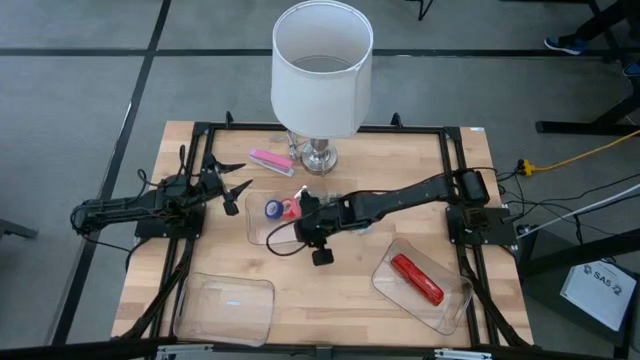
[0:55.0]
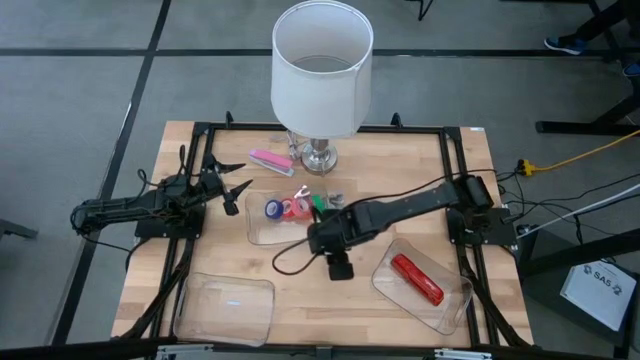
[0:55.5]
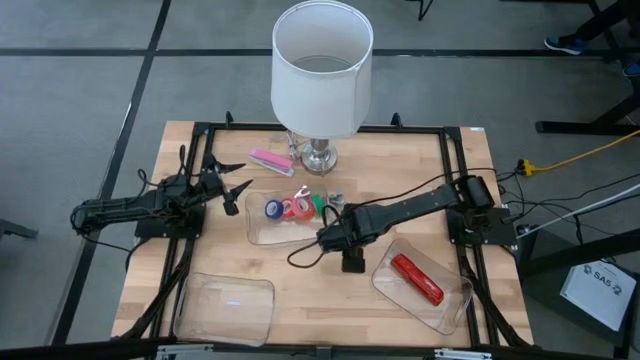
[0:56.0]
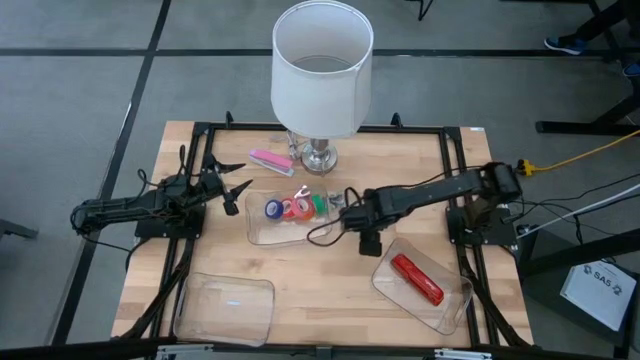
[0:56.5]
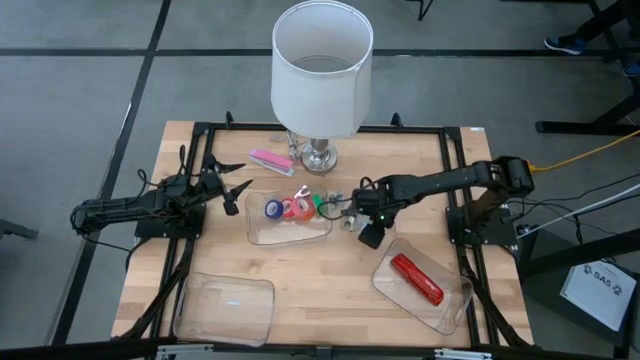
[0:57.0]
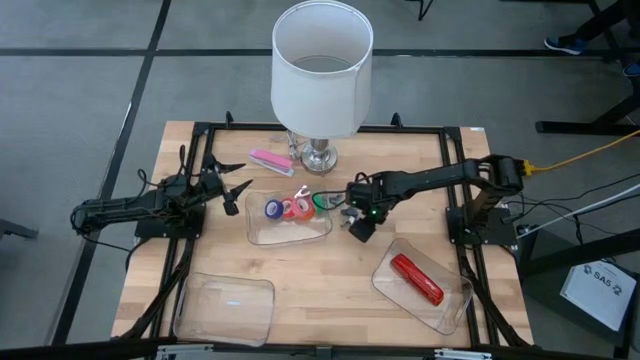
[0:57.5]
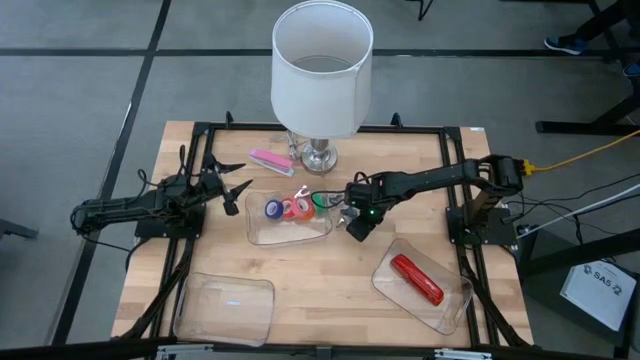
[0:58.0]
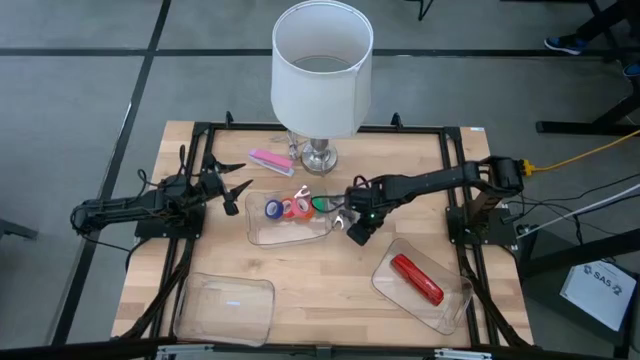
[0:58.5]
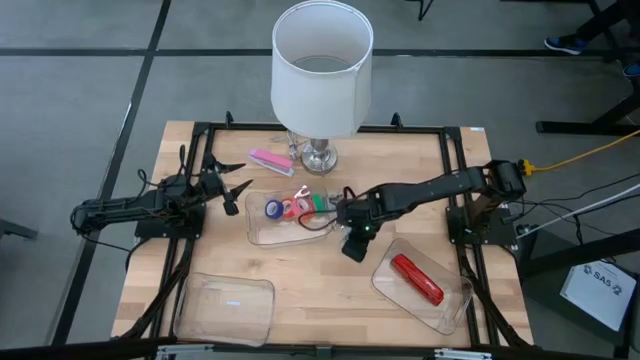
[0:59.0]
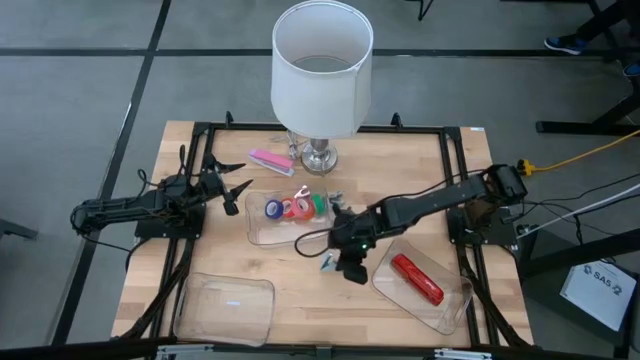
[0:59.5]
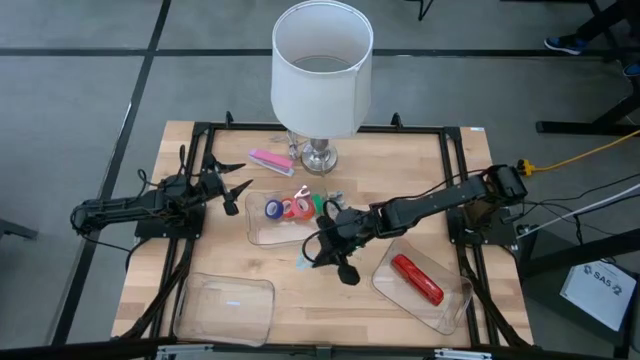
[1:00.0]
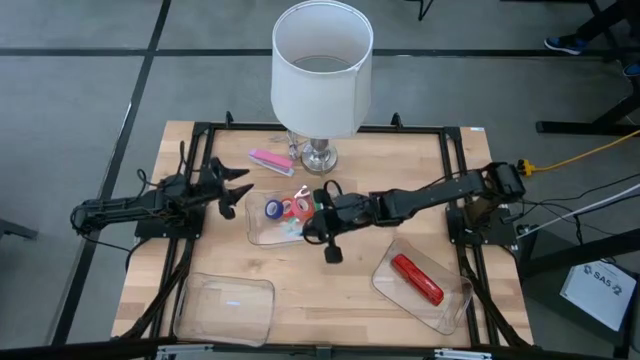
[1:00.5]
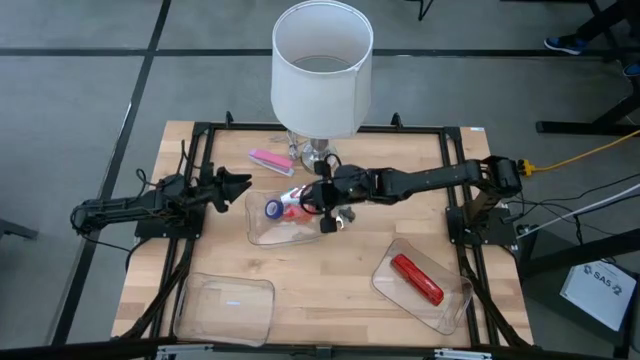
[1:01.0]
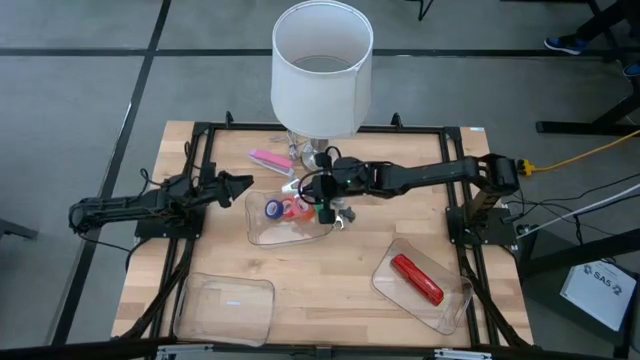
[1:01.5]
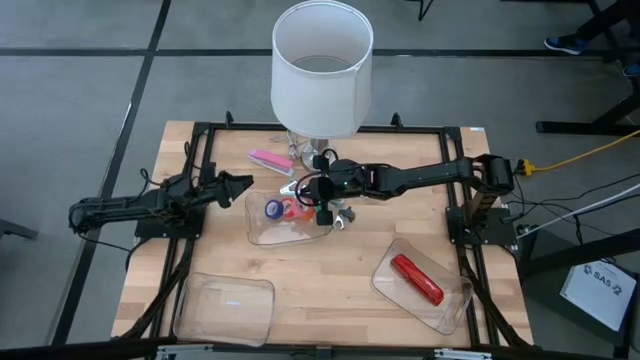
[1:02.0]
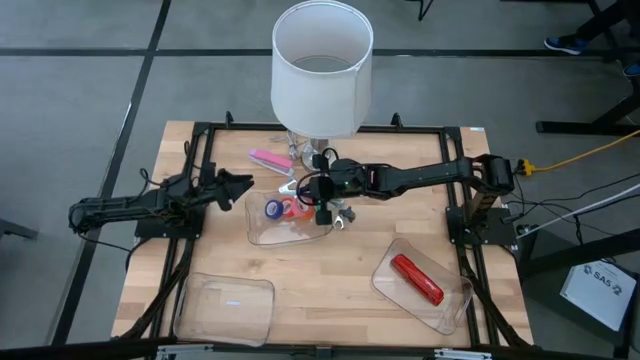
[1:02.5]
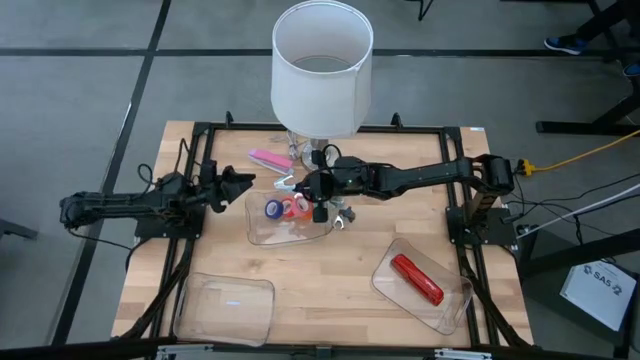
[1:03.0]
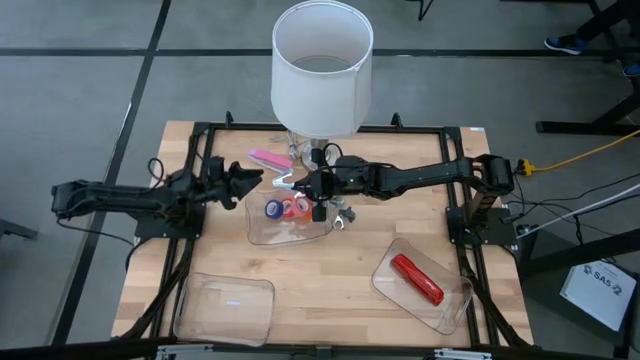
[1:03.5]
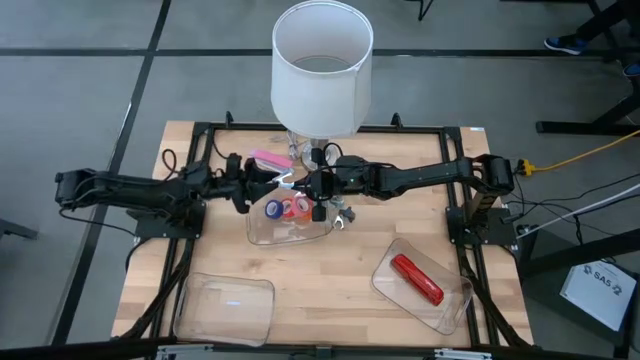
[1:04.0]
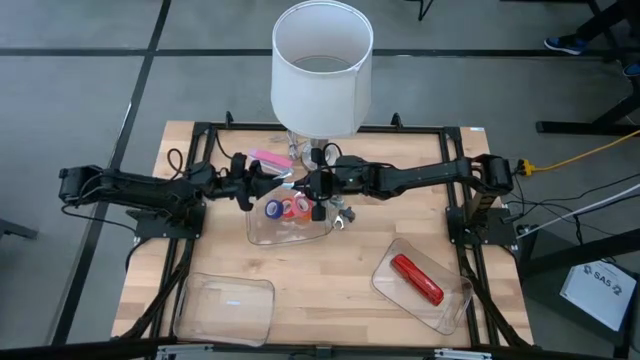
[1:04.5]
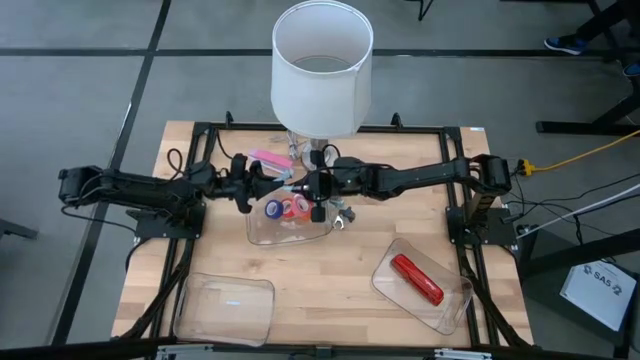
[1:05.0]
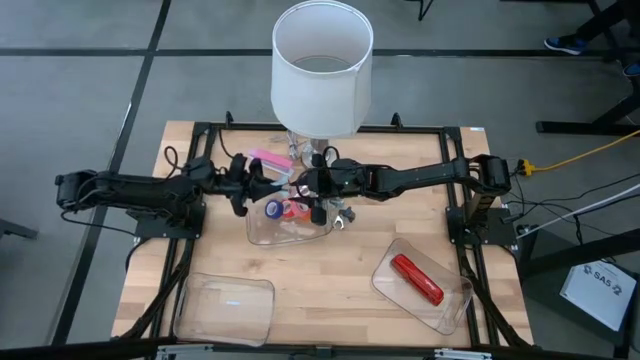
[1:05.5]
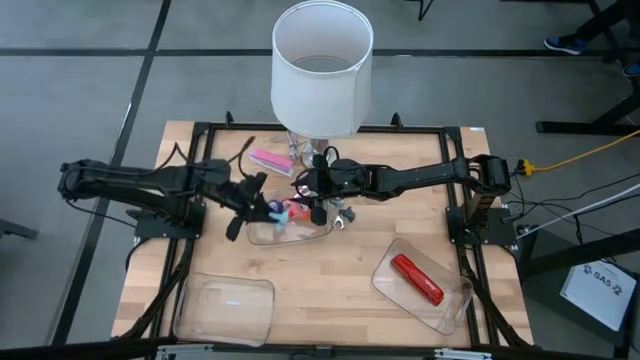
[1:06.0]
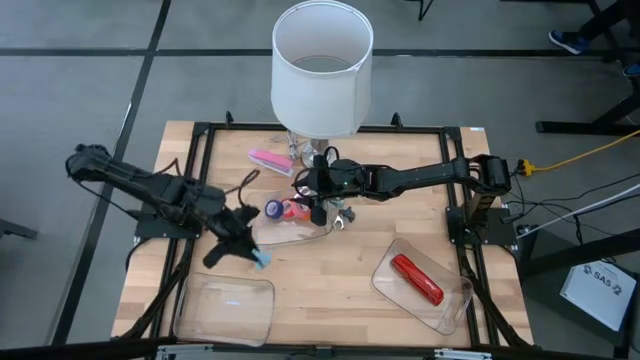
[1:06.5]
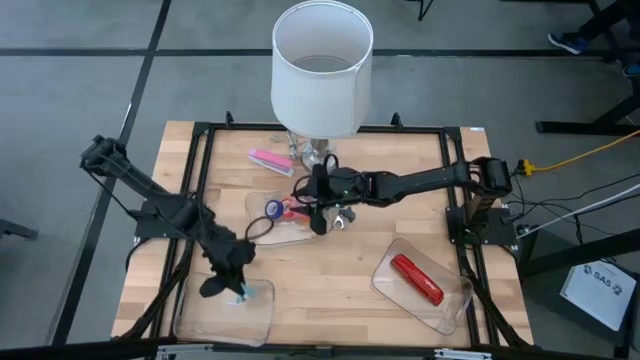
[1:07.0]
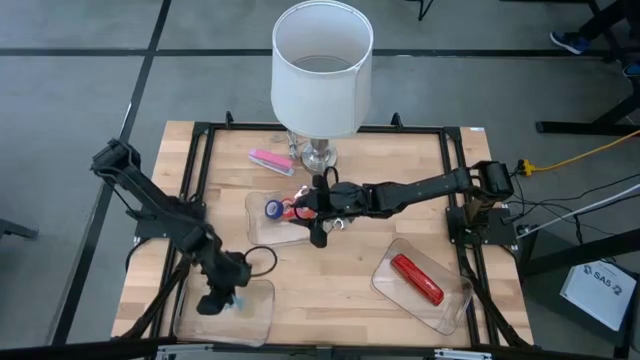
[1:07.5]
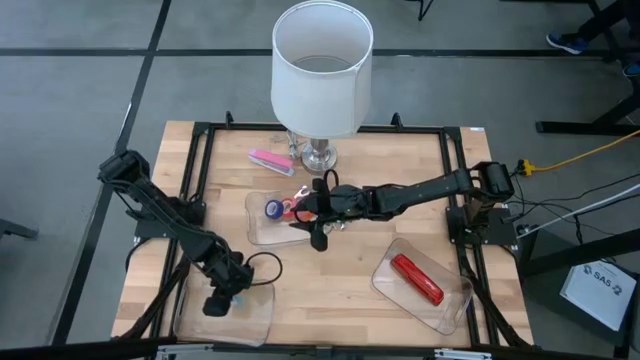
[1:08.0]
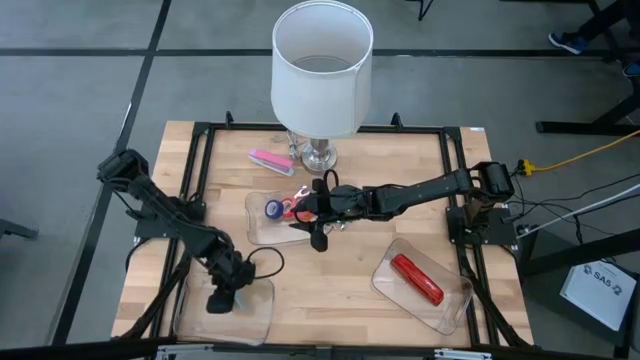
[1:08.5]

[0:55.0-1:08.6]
Task: Pick and place Stapler, Stapler remover, tape
Put the bottom blue staple remover into the bottom left transparent bin

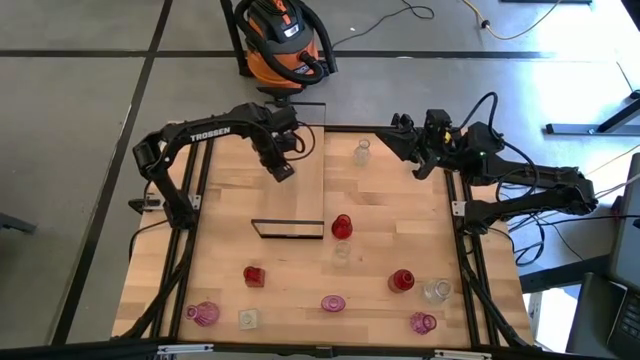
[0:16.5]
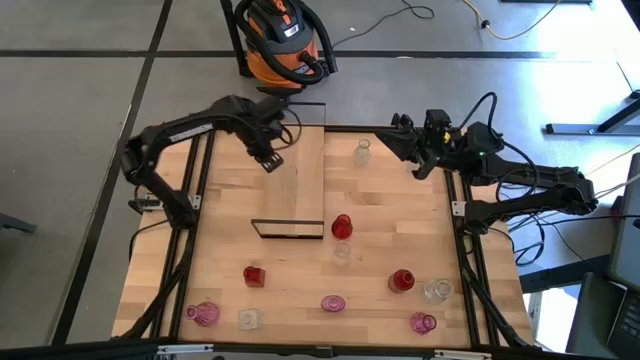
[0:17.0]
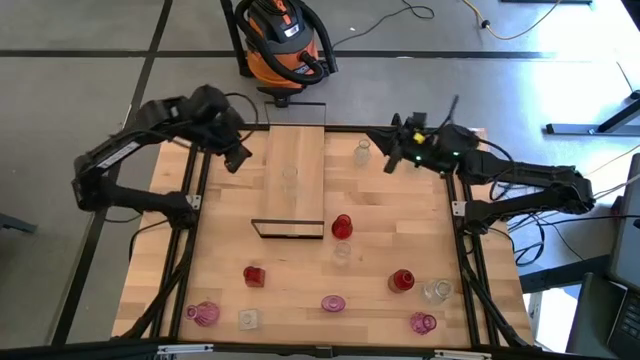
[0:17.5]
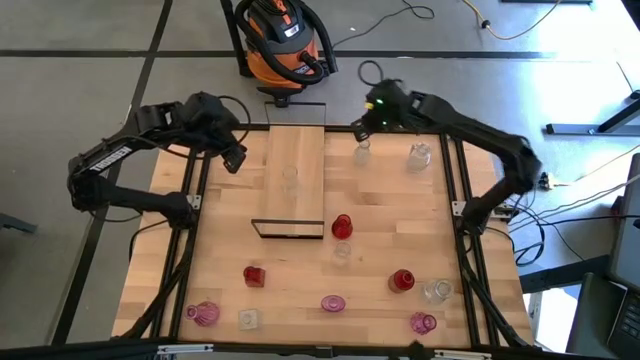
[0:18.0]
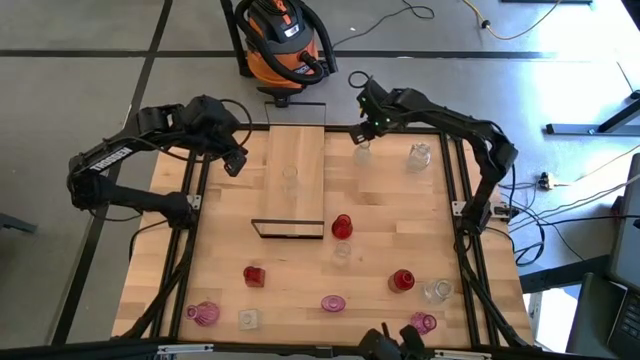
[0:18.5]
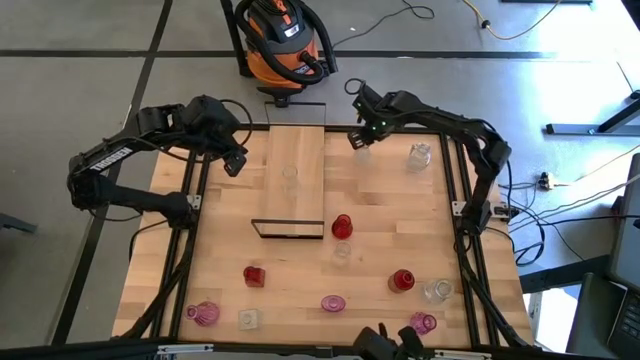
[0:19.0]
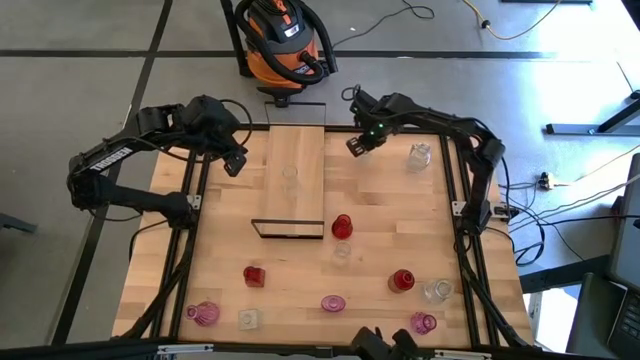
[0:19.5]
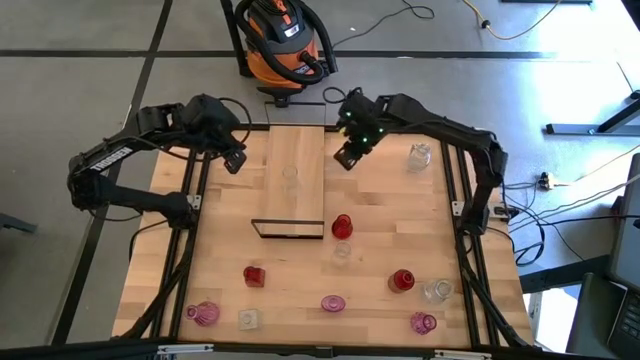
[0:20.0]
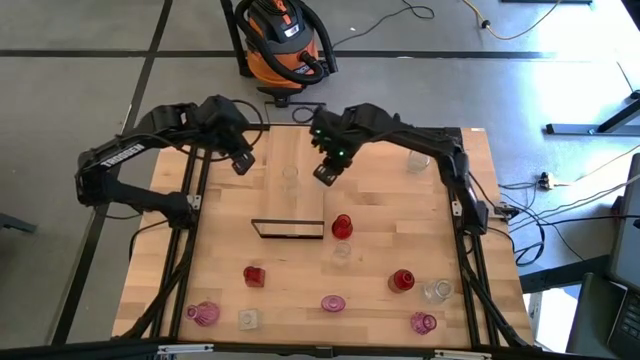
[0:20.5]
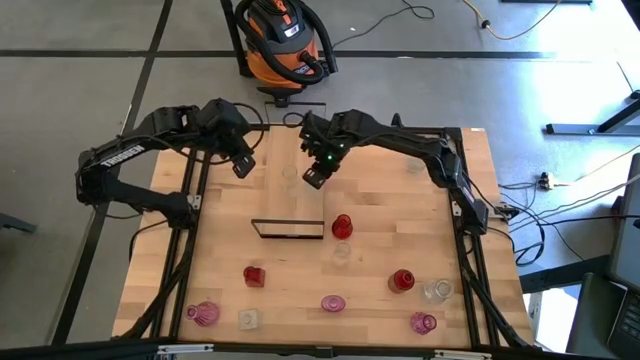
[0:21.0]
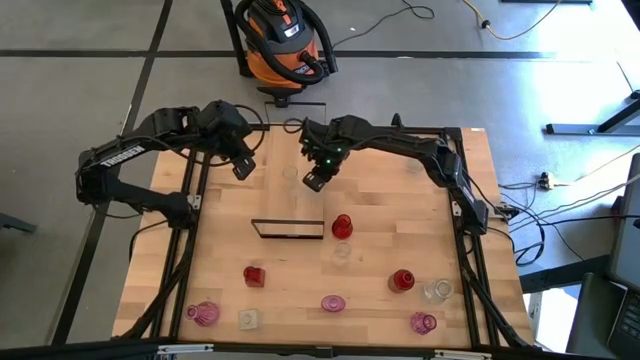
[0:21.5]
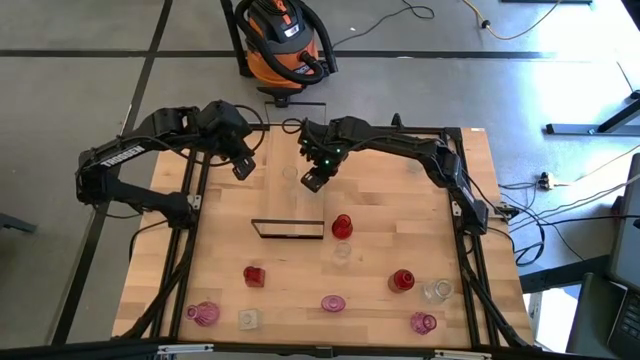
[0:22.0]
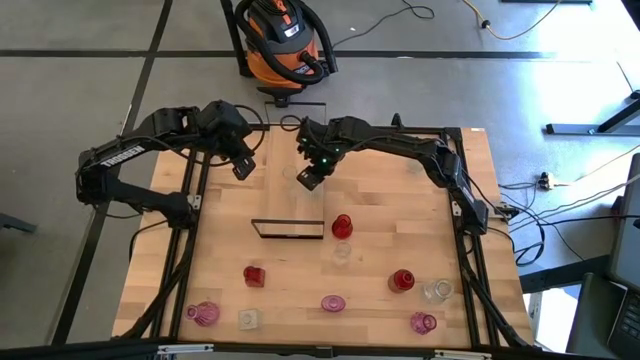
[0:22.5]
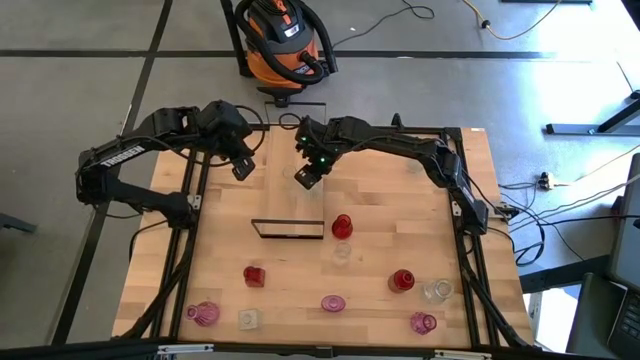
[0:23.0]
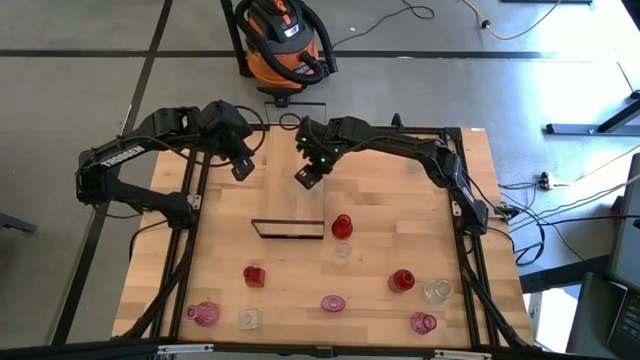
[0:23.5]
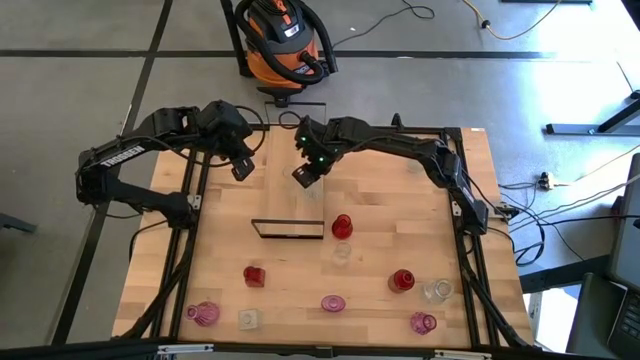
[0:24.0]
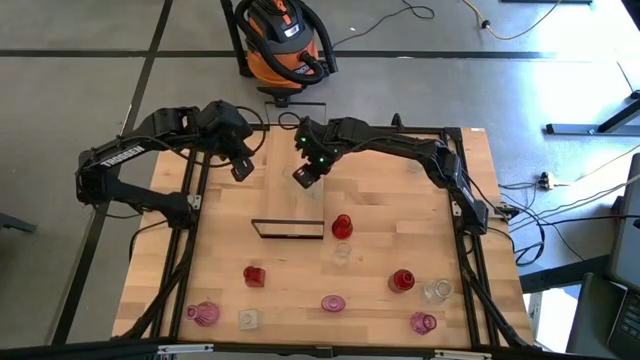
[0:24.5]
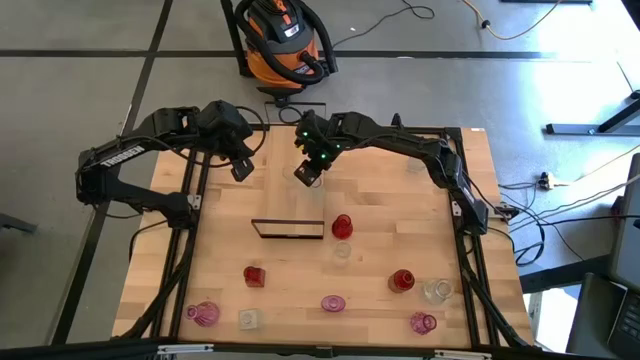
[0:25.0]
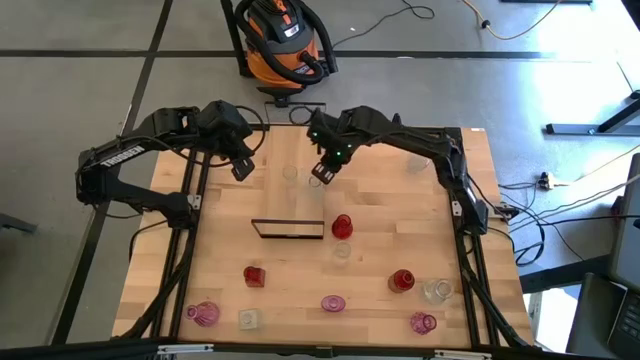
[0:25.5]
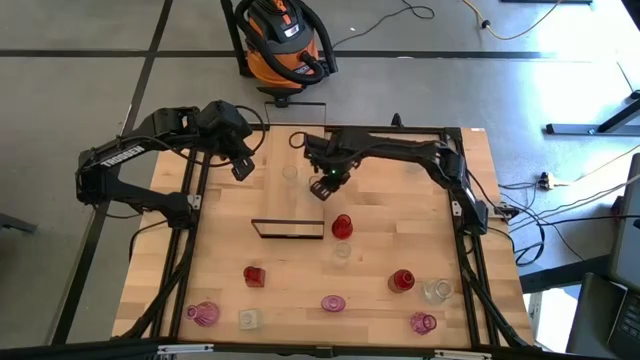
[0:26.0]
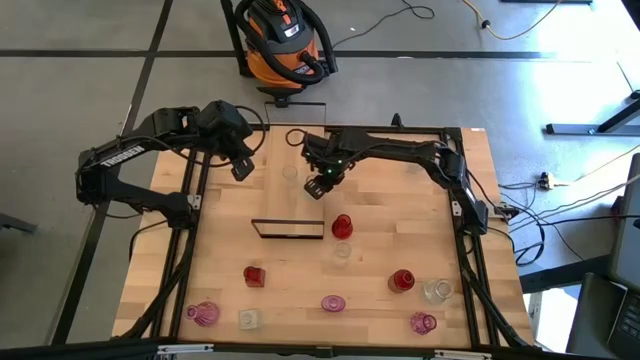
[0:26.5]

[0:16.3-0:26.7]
Task: sort vases onto shelf
Put the transparent vase on the shelf
